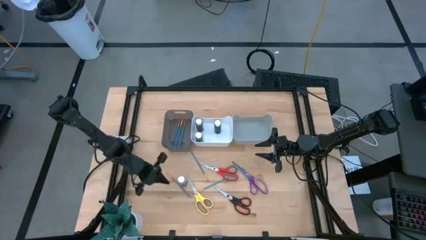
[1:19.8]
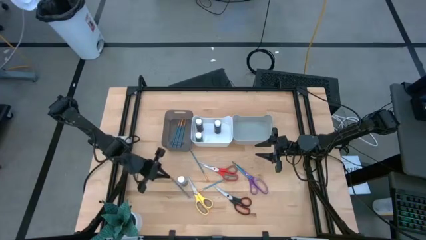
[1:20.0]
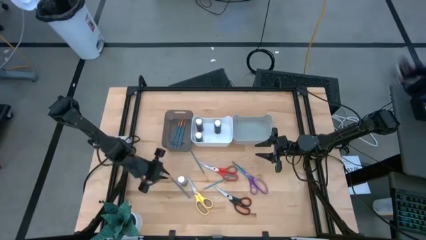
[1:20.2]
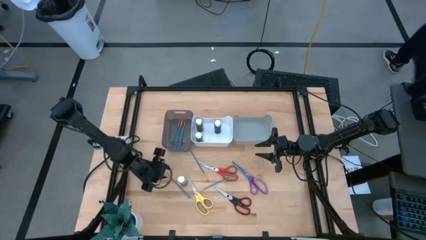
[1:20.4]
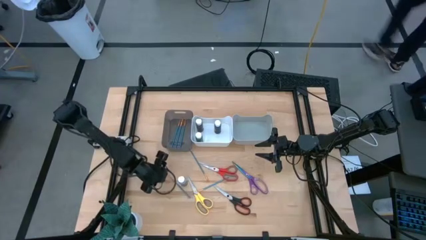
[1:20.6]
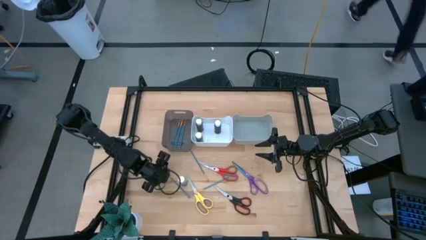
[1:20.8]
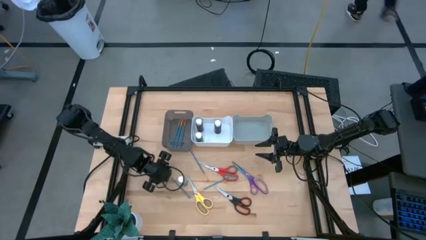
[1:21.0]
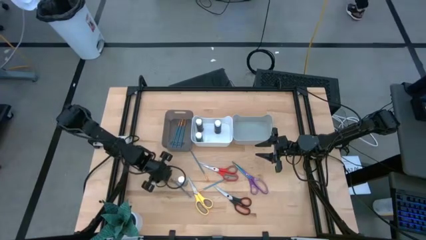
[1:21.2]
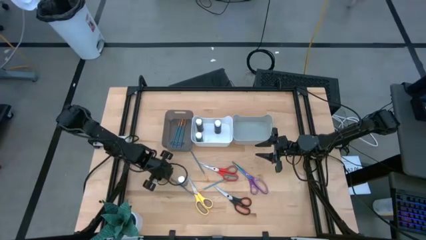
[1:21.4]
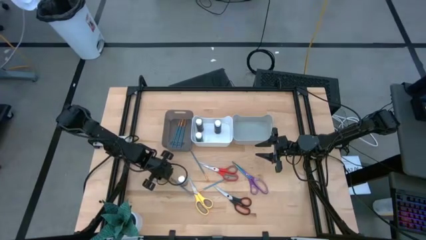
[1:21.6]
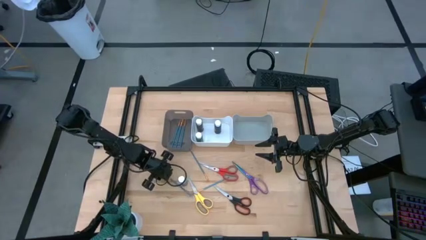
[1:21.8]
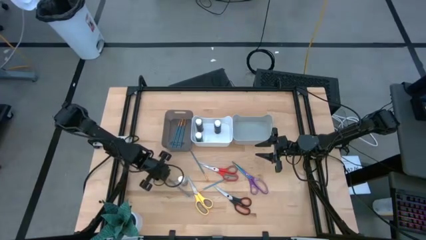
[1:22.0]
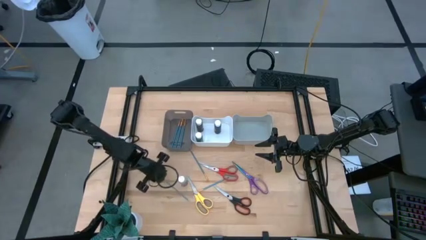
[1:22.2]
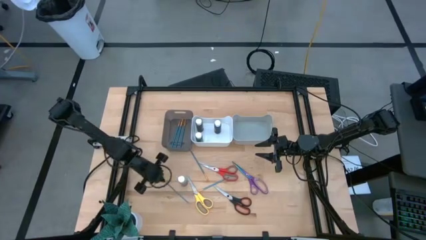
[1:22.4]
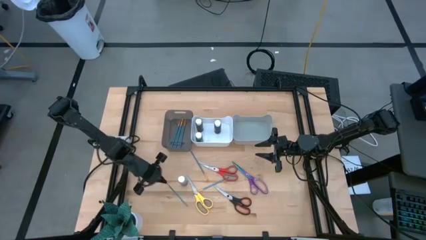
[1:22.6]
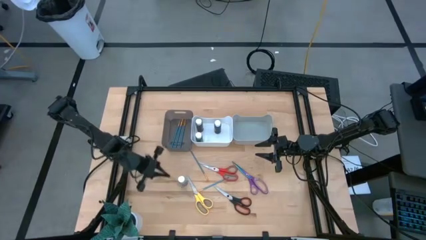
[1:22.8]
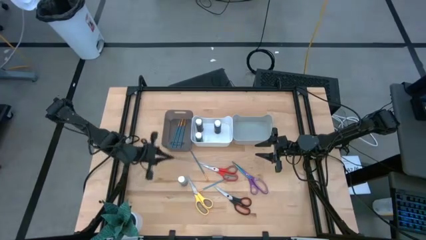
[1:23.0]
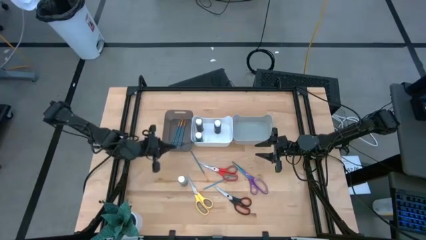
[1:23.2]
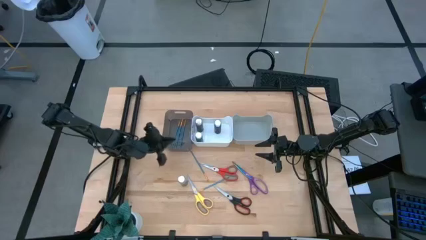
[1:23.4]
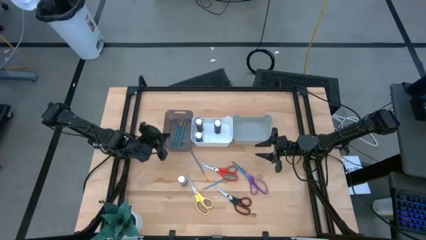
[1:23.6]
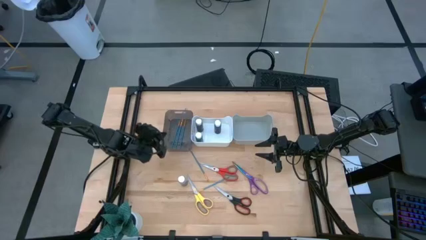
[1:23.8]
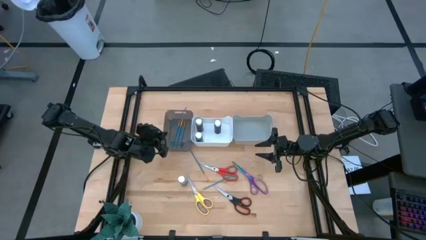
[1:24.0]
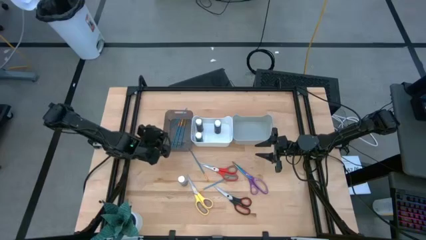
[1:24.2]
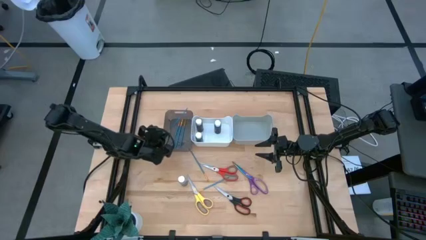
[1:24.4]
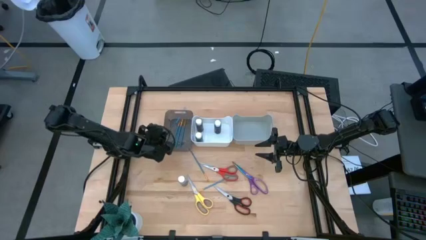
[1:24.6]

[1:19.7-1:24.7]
Task: Pick & Place Paint Supplies
Put the blue paint brush into the black bin

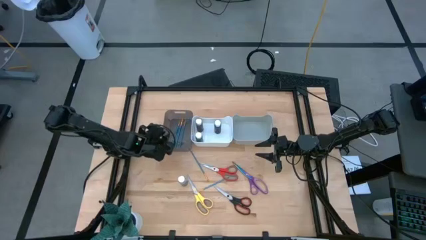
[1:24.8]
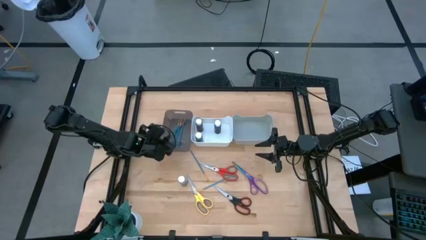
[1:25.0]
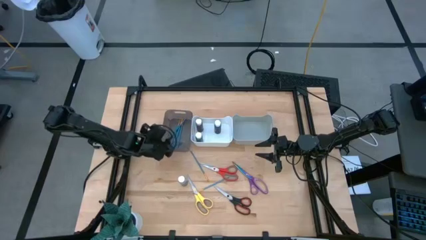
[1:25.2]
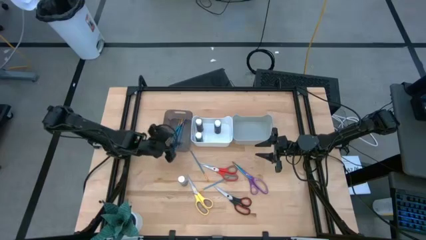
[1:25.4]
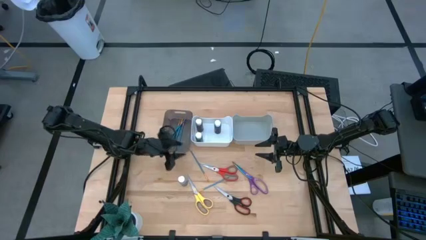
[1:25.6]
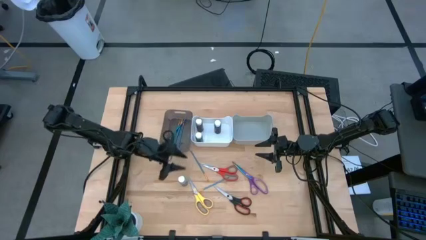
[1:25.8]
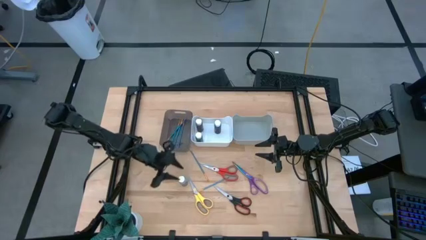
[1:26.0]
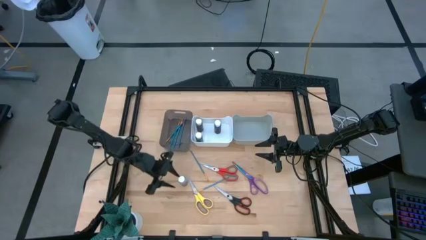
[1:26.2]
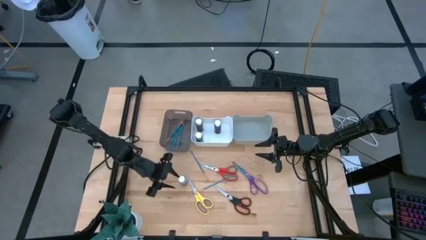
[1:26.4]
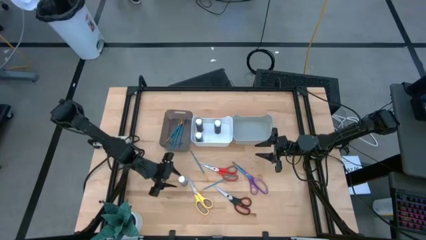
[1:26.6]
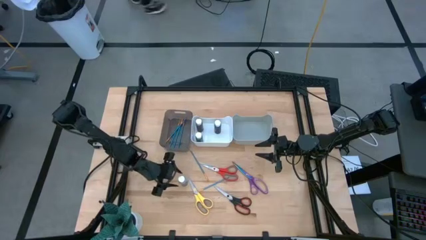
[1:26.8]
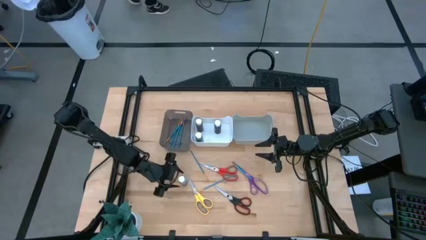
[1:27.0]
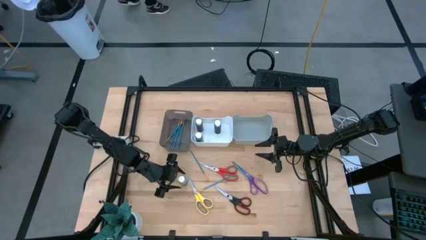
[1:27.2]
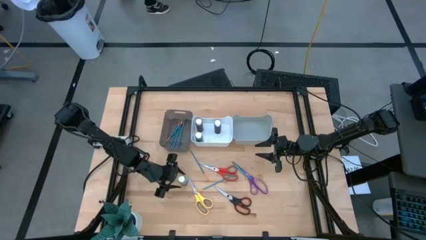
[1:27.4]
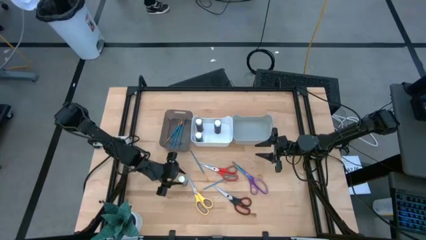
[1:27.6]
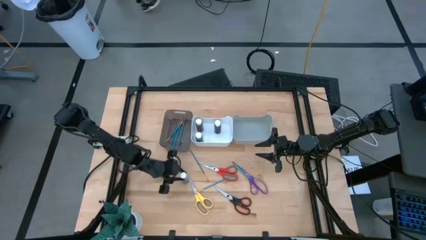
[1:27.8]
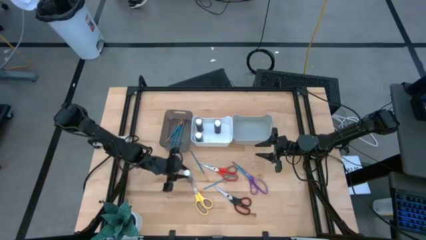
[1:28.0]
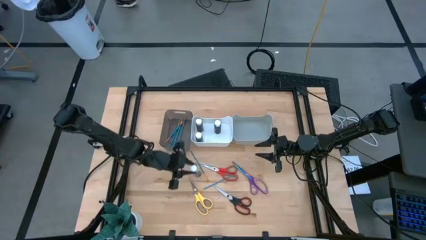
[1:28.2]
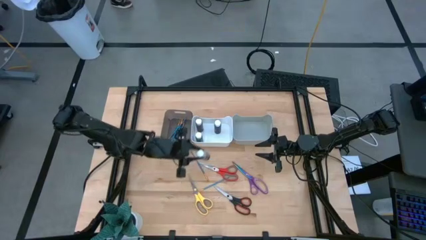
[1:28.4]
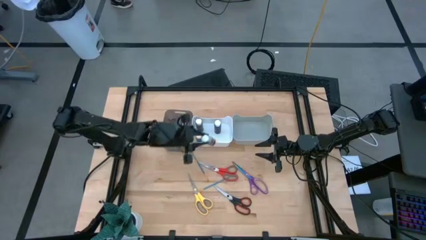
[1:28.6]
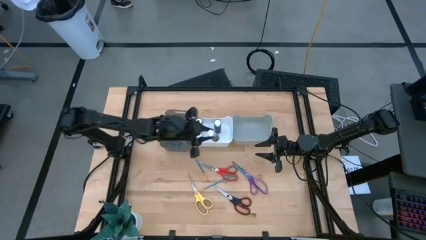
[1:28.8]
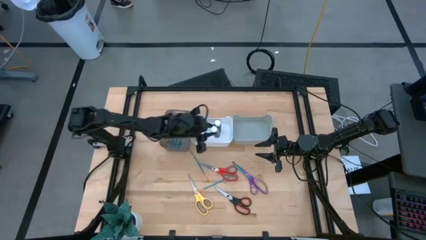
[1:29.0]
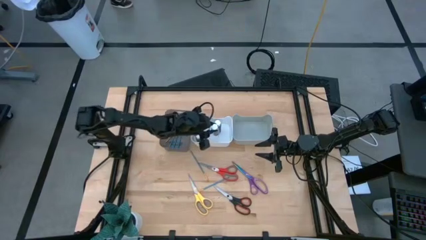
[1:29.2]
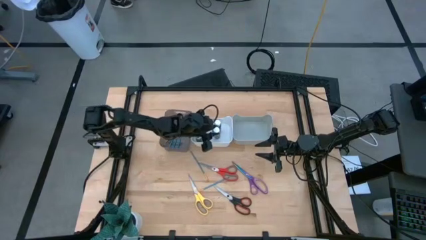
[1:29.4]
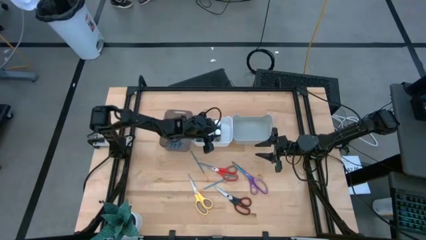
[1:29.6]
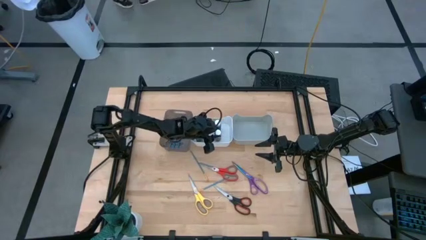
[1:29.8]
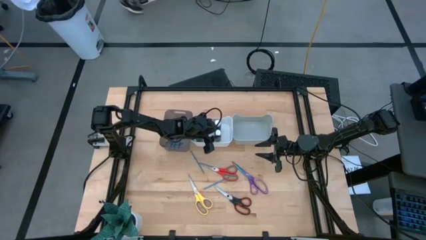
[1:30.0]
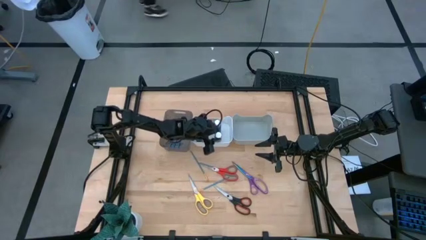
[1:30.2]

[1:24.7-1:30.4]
Put the gray paint bottle into the white bin

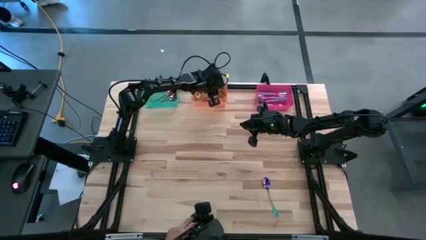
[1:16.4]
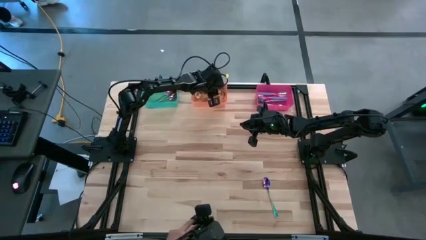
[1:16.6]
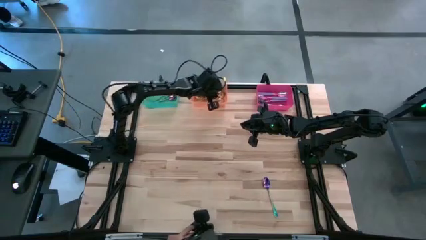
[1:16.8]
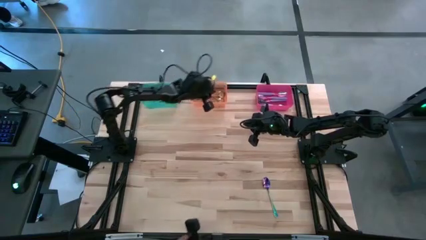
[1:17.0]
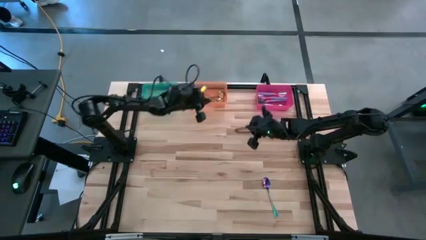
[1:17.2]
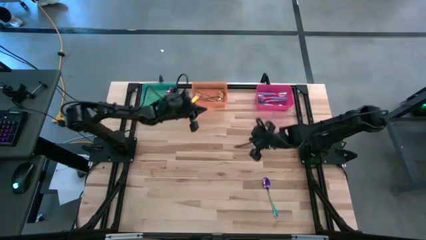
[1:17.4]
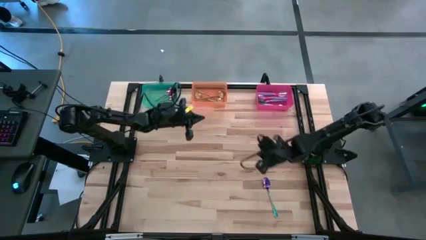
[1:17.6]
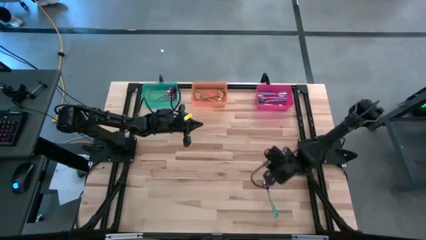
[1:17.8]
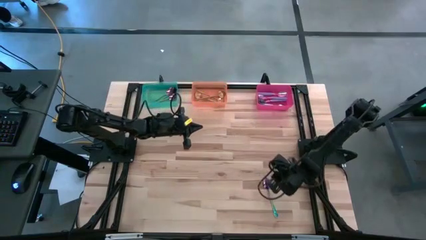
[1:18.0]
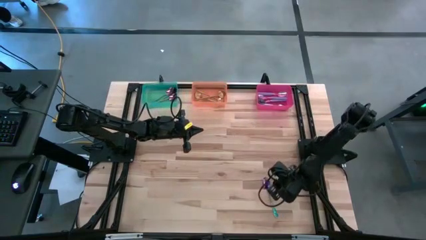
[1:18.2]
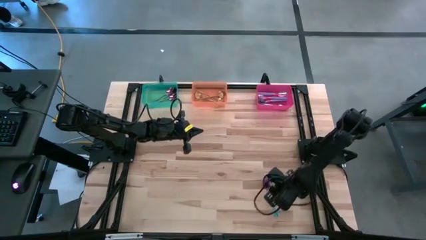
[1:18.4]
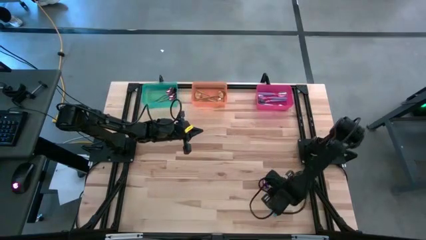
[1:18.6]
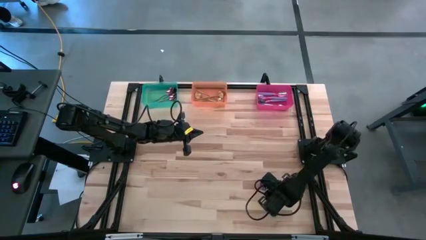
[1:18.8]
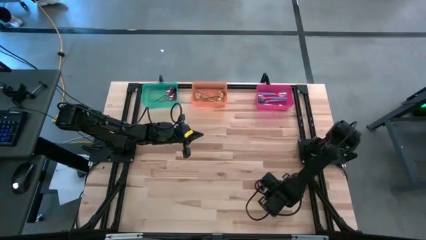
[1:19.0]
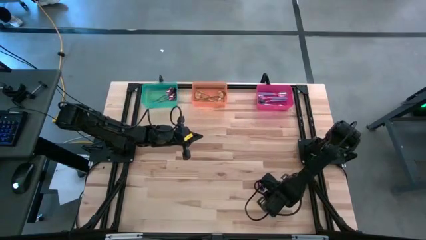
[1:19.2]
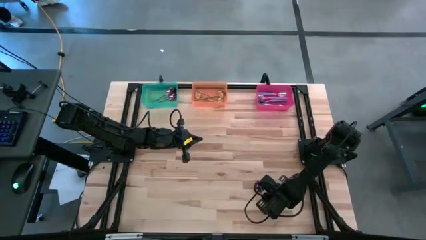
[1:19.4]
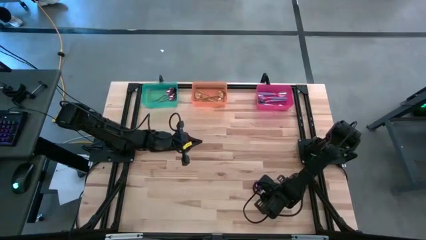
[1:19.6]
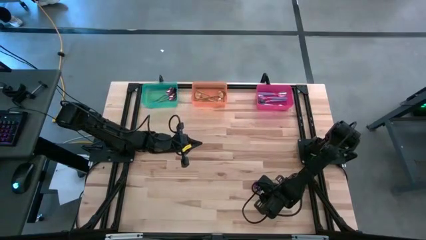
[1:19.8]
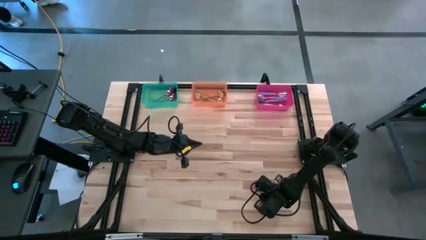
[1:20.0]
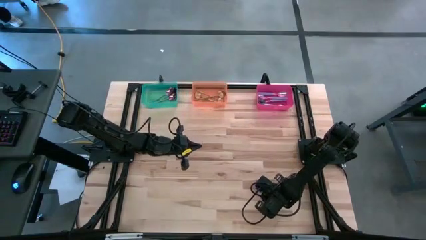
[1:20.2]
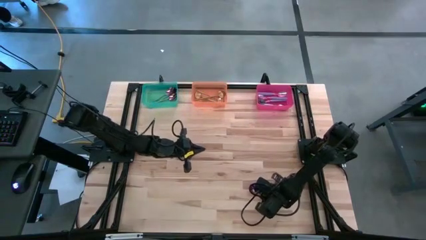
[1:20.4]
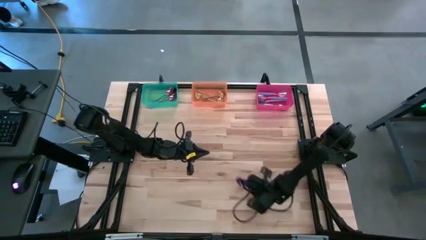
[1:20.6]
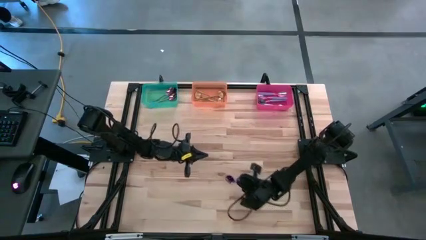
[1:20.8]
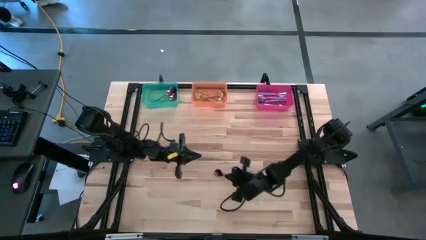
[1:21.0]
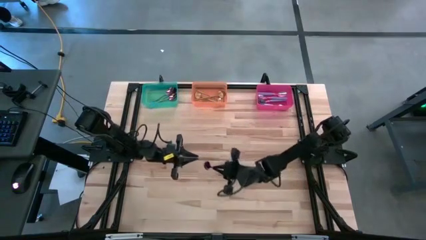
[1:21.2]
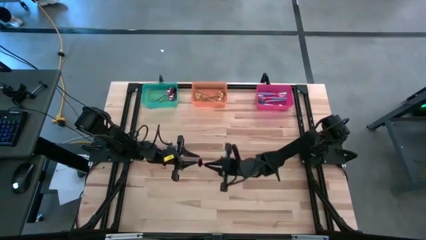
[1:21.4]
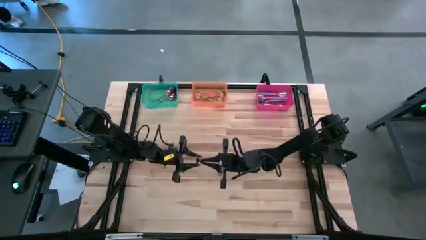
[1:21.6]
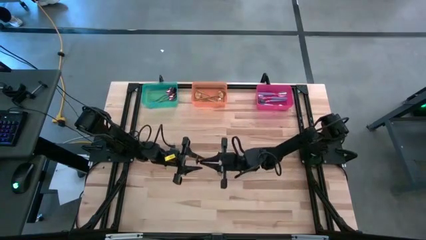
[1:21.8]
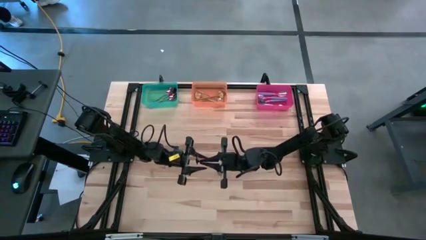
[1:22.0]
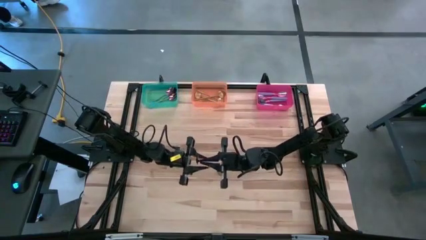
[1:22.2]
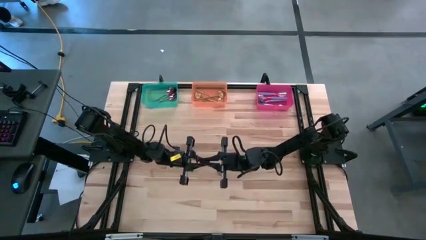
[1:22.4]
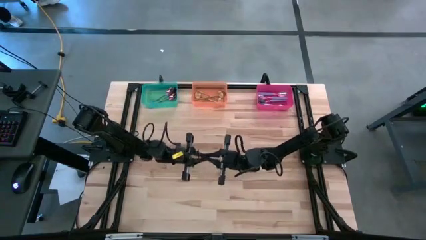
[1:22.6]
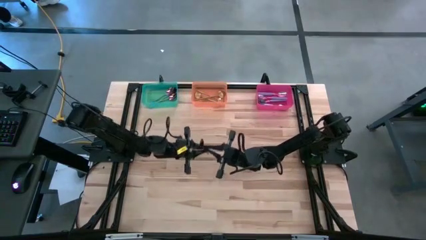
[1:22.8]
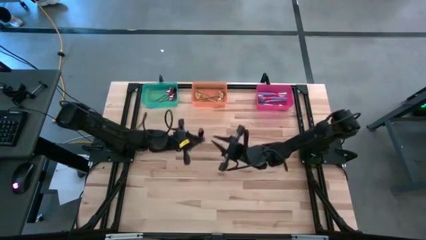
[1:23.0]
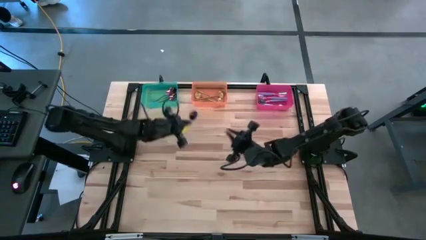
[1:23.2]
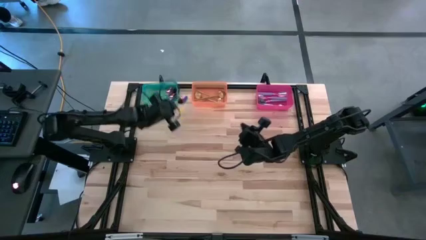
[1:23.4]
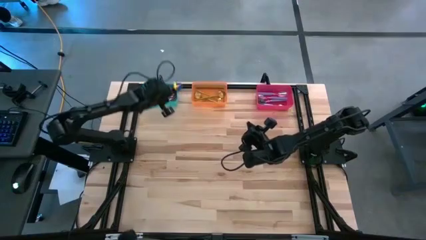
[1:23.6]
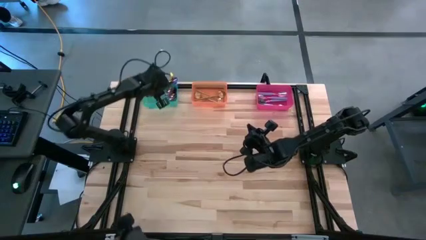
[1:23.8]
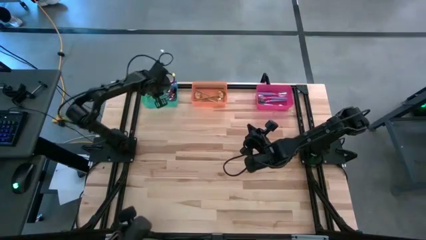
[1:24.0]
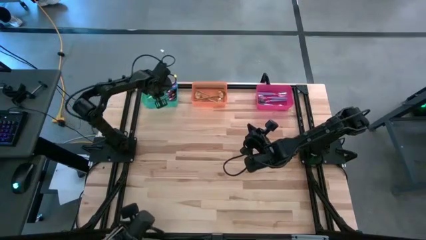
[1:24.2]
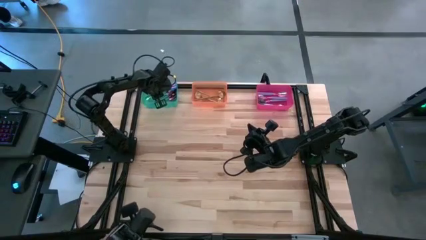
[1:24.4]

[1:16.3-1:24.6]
Task: Sort silverware by color (type)
Put the blue spoon into the green bin
